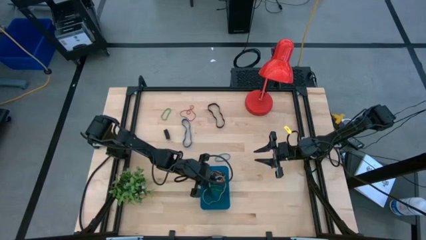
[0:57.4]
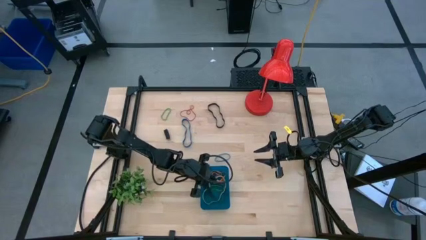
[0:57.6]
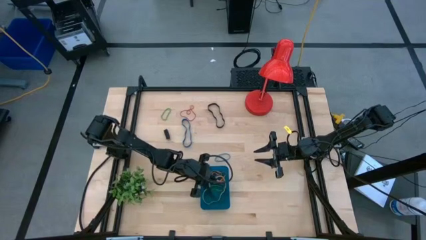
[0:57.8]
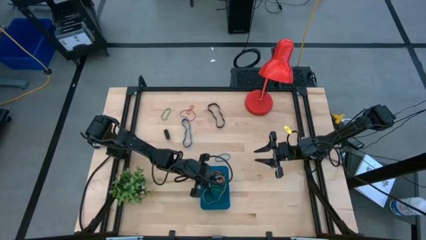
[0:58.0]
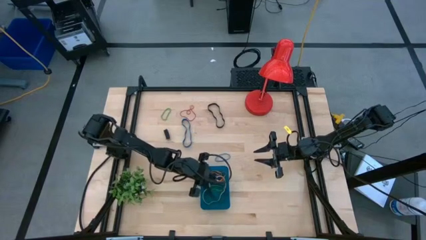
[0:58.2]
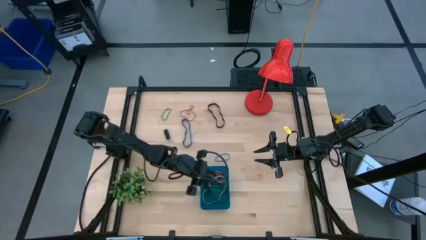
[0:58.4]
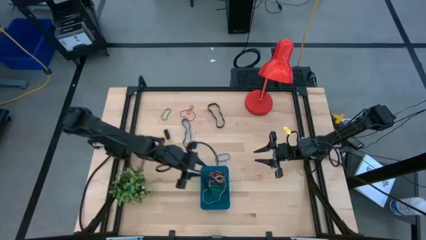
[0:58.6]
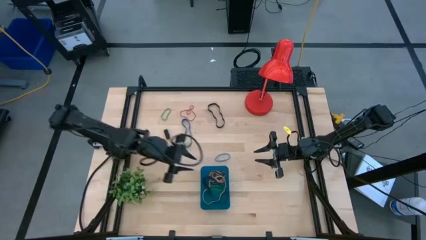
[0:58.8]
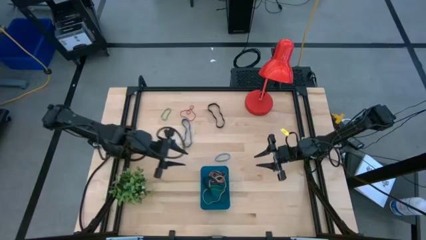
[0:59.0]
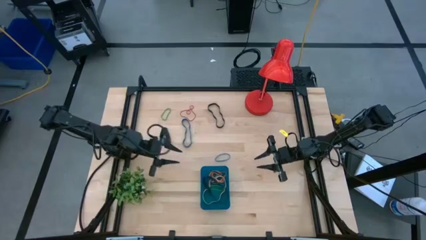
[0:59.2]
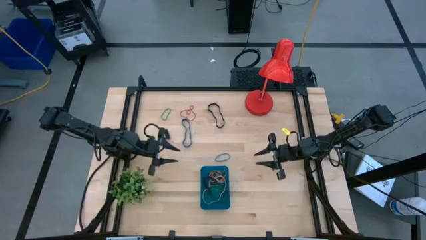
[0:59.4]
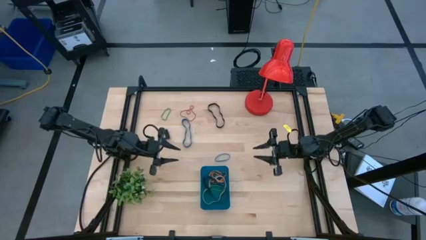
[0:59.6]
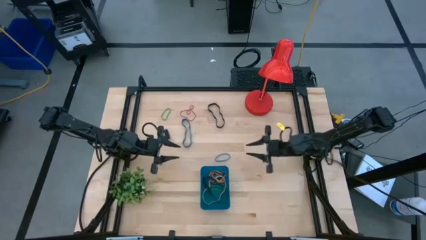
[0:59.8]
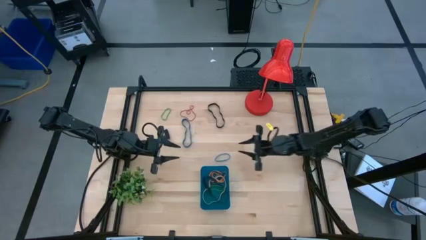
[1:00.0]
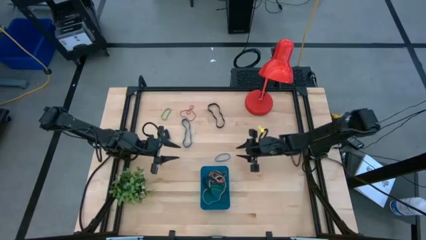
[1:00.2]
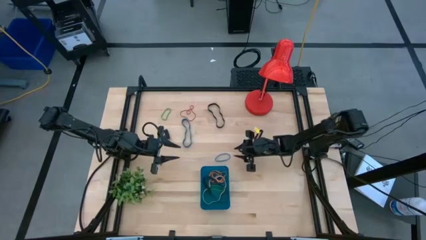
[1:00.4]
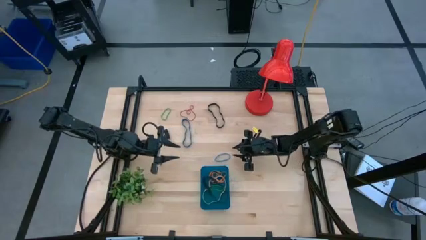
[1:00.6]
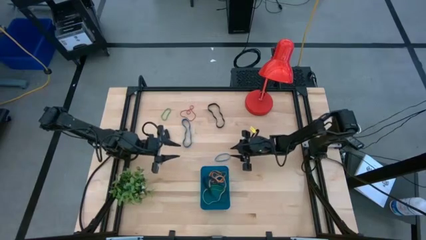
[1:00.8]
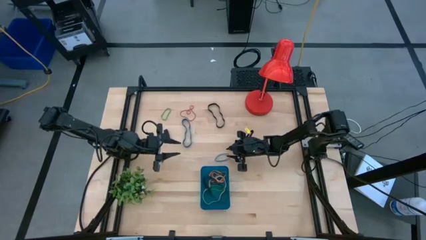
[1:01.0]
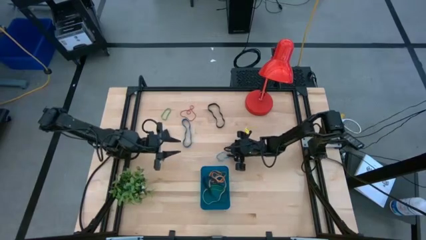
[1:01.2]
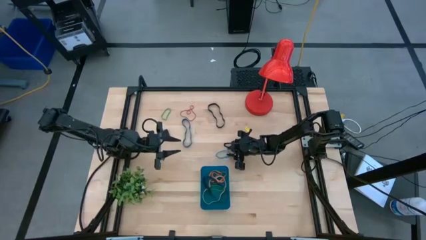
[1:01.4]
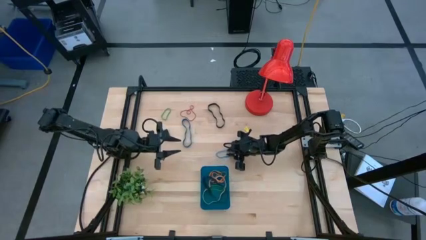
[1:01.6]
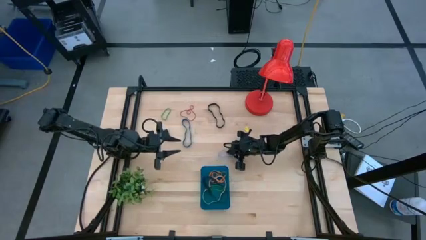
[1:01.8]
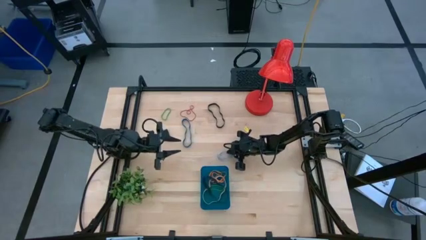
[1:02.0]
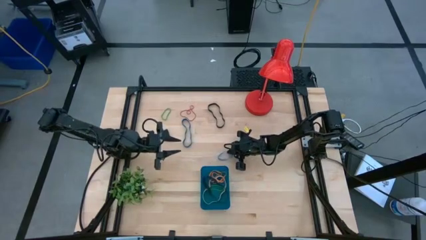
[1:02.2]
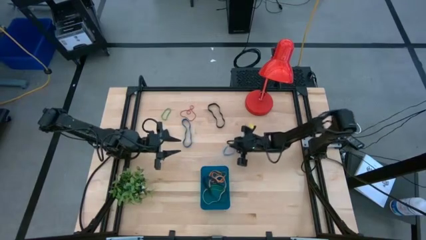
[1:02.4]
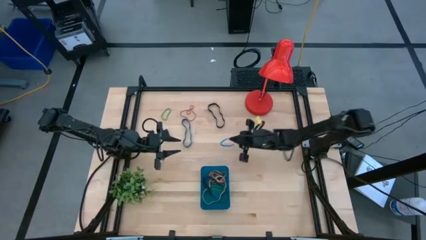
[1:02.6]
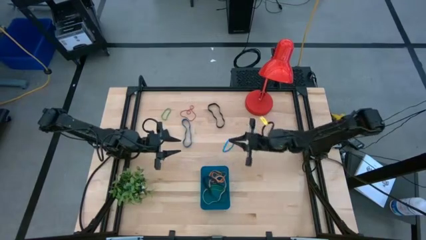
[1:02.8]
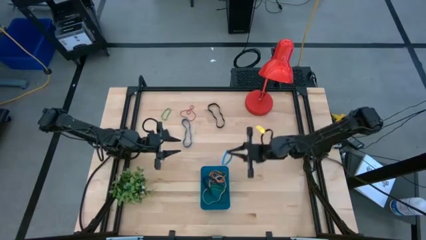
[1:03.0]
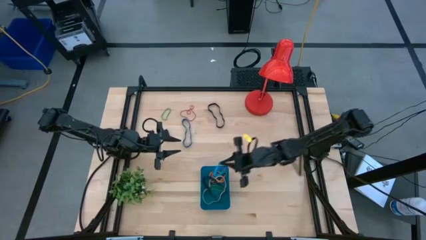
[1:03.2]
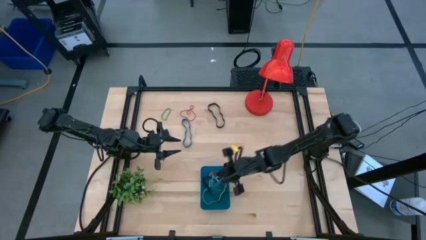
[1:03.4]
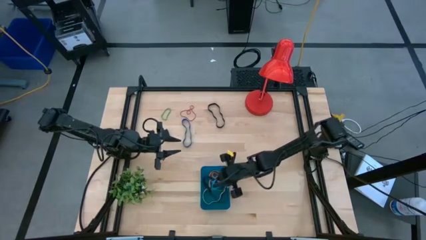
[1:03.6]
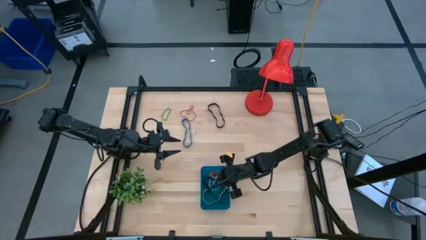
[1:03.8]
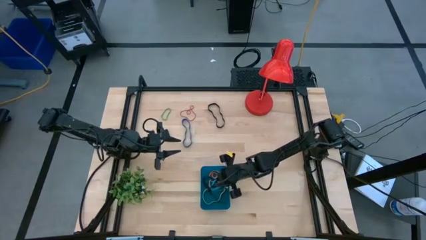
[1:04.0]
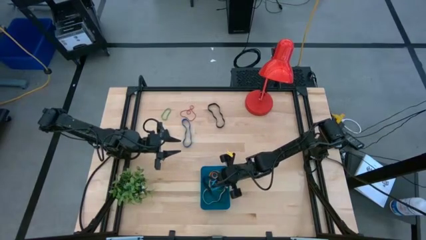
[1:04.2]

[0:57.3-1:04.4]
Task: Pick and place rubber bands into bin
Put the light blue rubber band into the blue bin

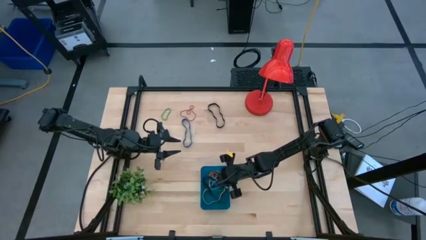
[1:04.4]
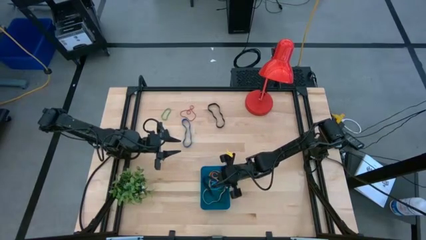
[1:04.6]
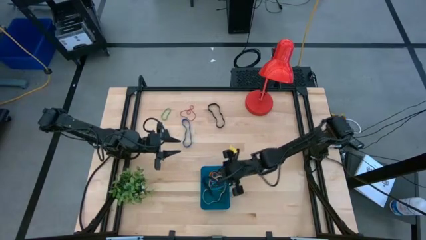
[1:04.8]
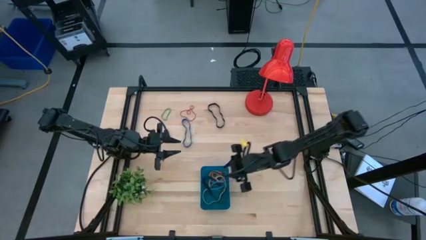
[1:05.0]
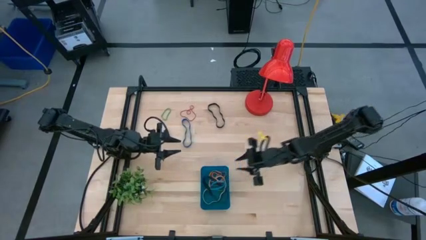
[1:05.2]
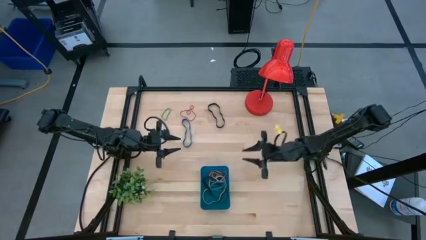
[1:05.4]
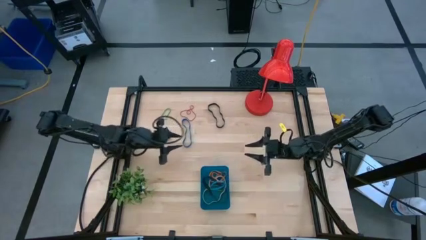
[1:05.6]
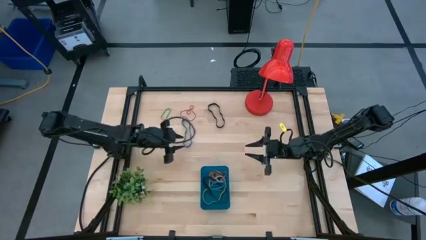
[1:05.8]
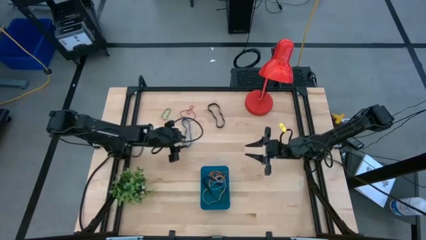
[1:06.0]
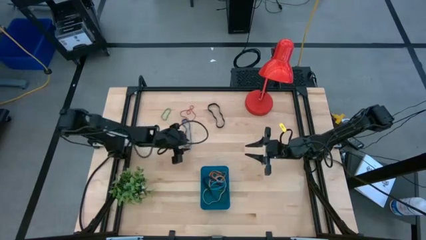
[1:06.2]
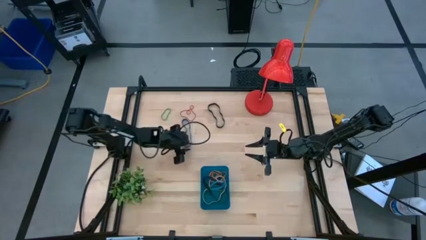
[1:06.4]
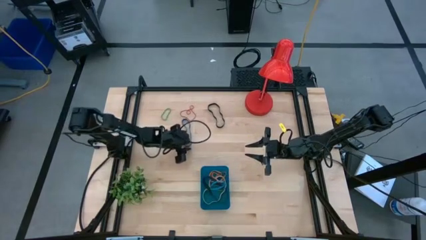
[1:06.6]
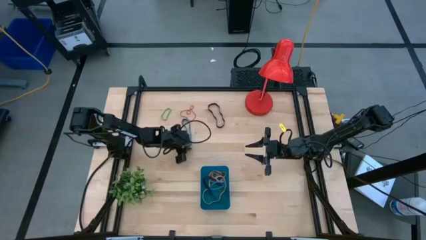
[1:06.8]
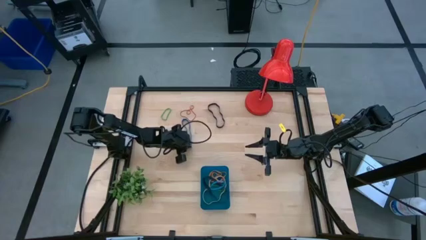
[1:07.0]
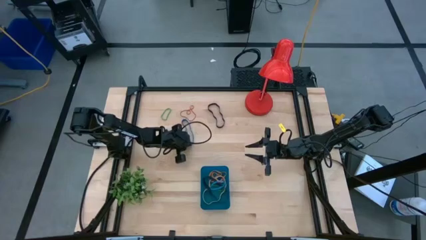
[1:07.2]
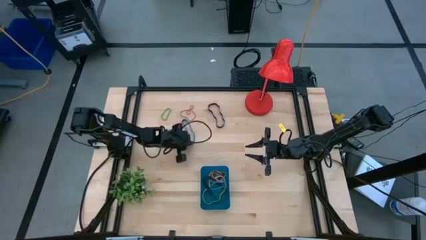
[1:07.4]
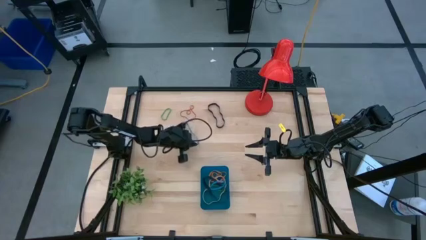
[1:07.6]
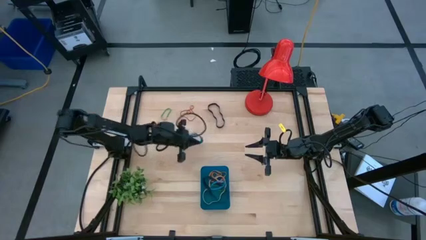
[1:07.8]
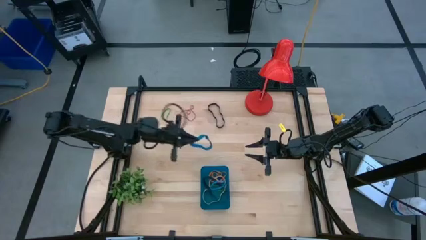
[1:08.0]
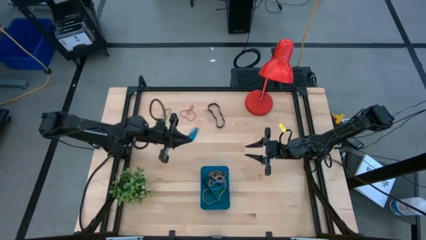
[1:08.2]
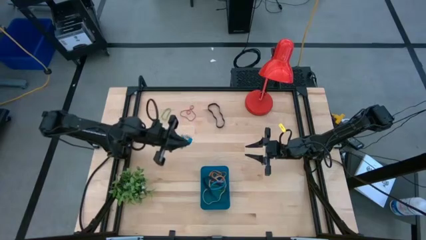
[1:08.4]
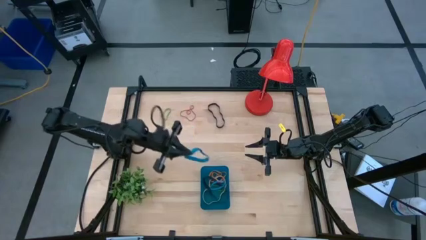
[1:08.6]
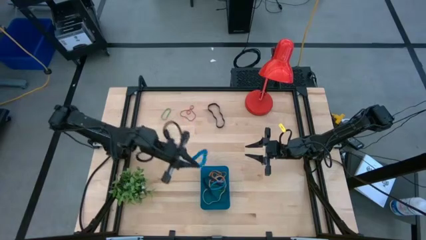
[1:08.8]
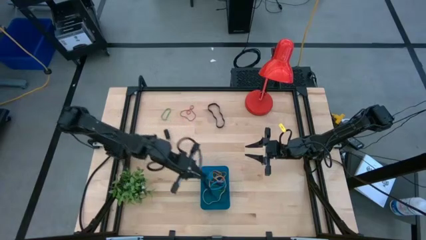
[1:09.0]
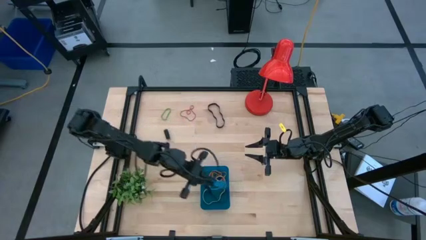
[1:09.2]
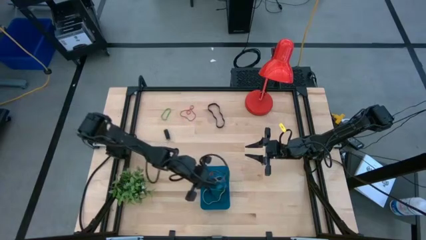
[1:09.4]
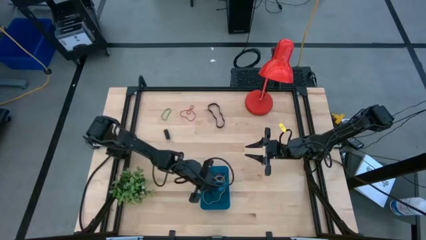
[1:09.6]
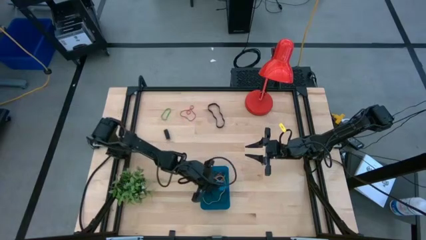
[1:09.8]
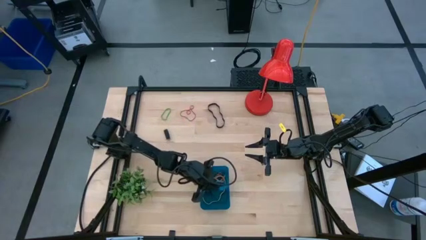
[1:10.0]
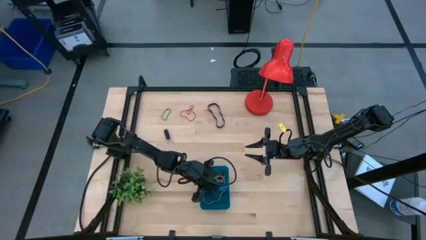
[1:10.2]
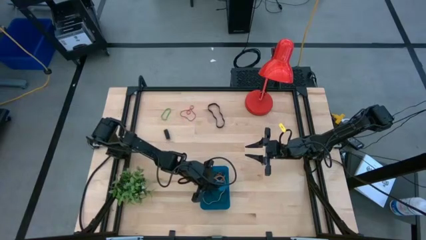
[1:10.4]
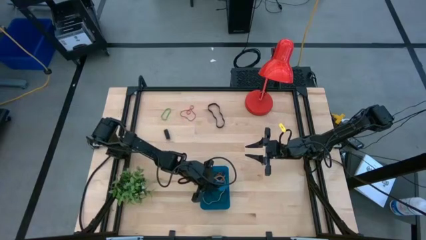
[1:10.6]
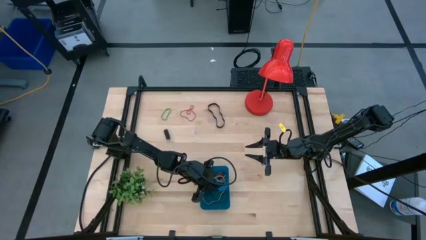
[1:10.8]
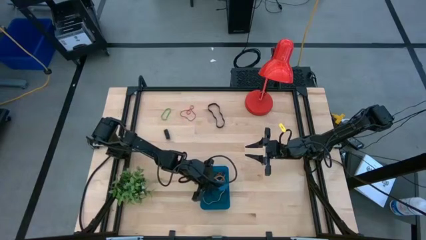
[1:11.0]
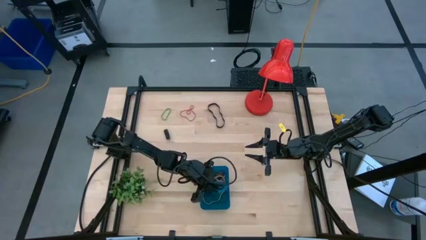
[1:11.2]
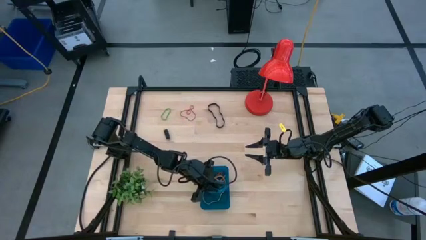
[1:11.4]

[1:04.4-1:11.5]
Put the blue rubber band into the blue bin

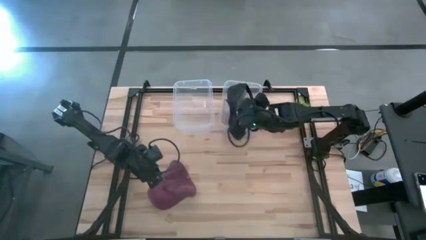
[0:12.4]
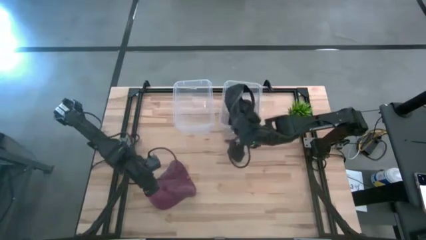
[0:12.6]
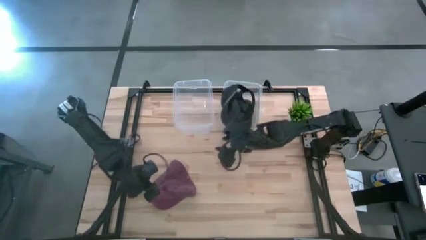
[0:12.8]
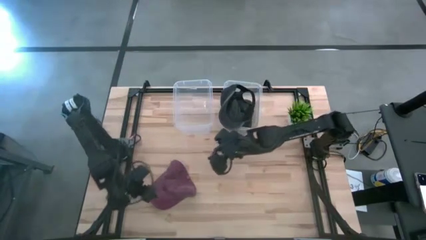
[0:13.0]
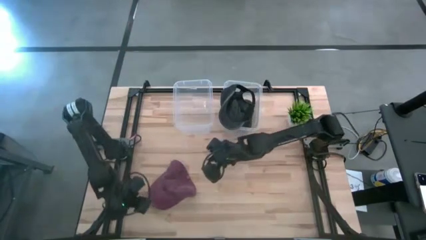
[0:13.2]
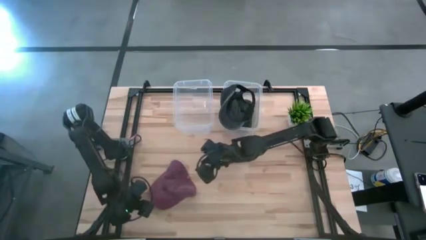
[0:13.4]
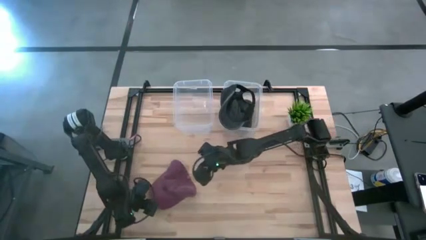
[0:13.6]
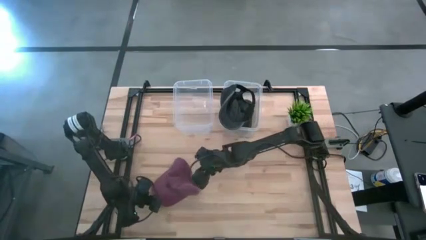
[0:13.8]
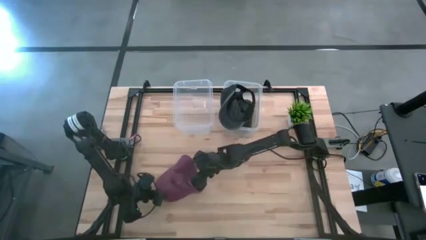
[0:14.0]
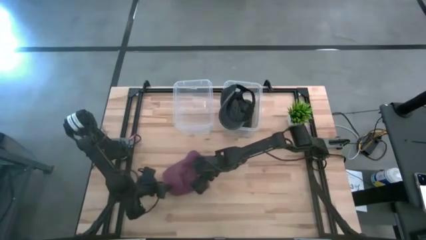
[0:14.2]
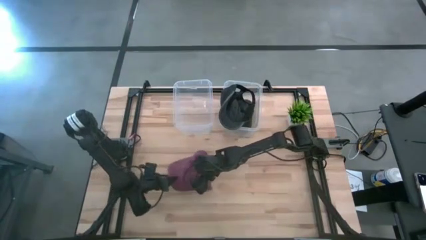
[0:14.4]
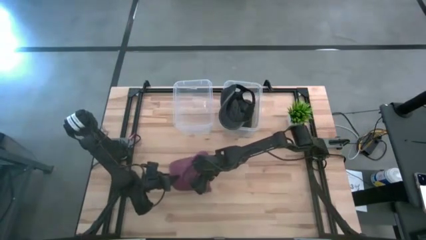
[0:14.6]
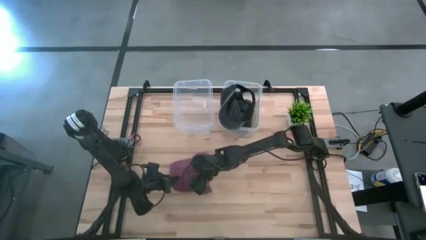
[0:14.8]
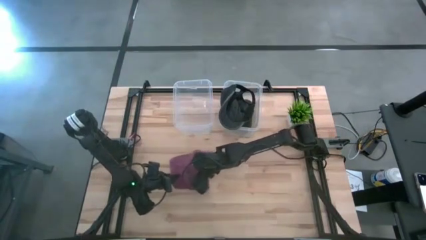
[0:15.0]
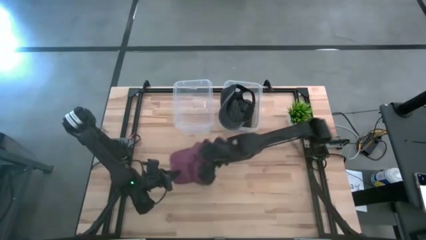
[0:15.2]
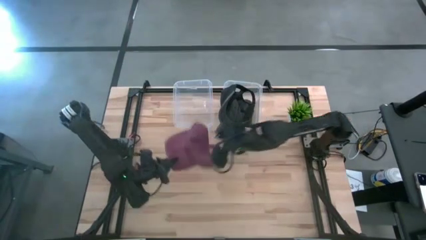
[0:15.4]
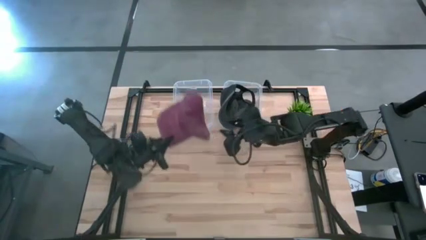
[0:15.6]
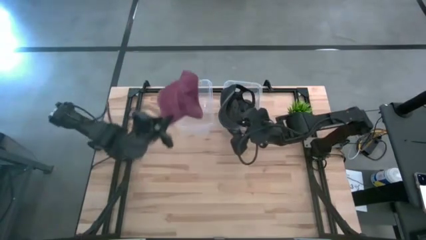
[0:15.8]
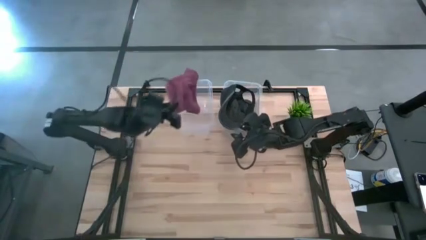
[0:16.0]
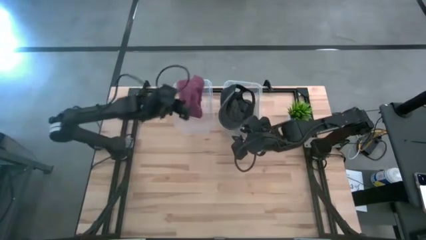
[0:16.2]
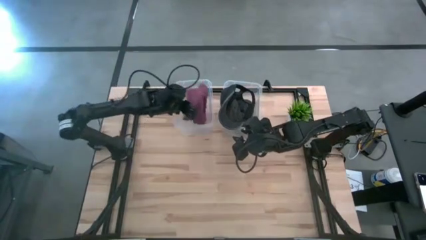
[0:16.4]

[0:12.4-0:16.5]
Task: Pick & Place hat
Put the red cap into the left transparent bin
